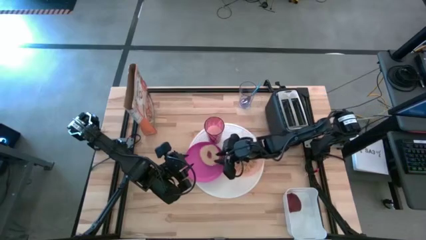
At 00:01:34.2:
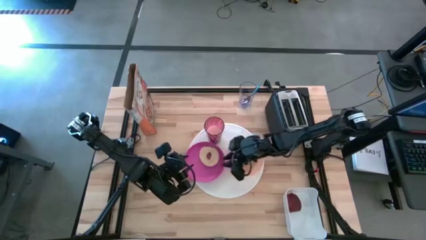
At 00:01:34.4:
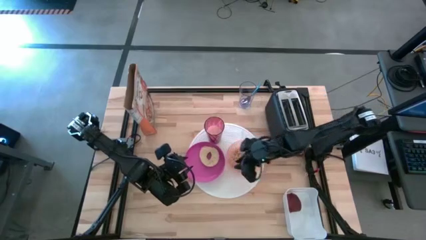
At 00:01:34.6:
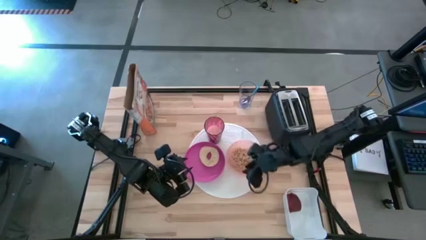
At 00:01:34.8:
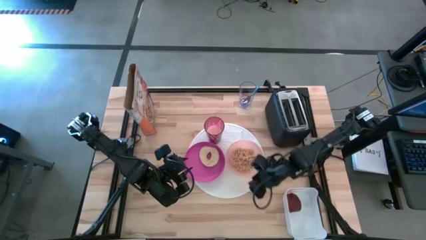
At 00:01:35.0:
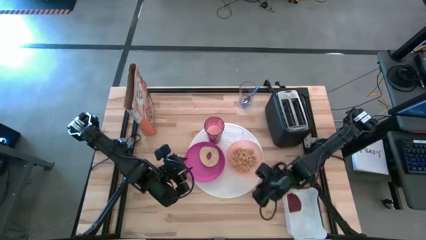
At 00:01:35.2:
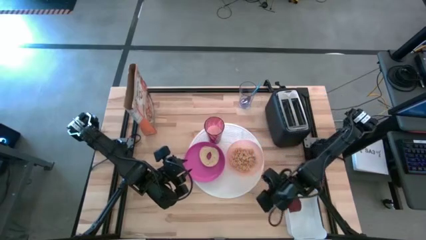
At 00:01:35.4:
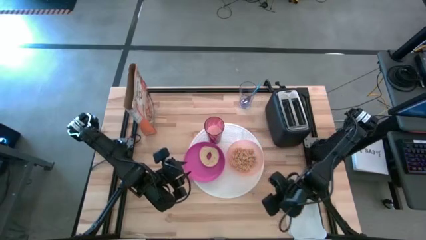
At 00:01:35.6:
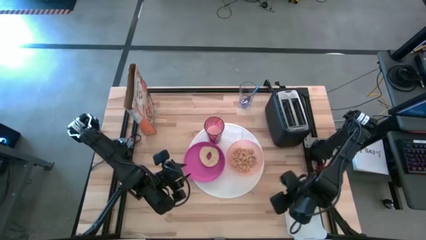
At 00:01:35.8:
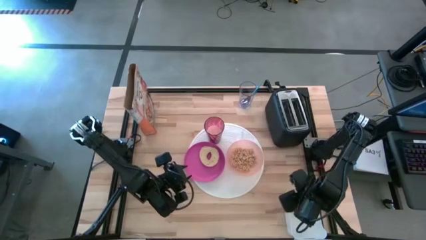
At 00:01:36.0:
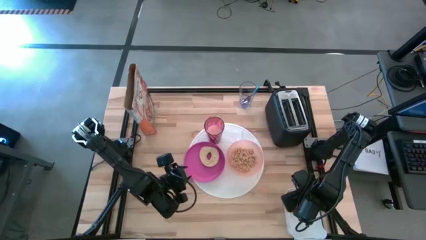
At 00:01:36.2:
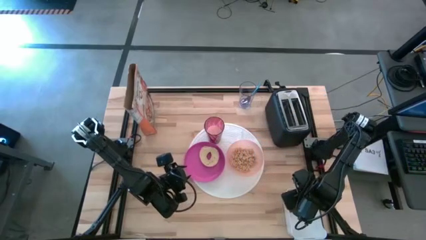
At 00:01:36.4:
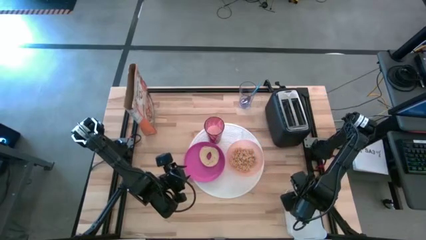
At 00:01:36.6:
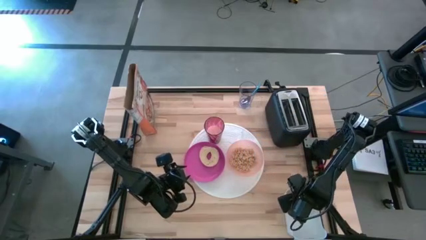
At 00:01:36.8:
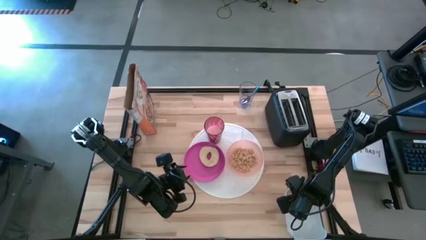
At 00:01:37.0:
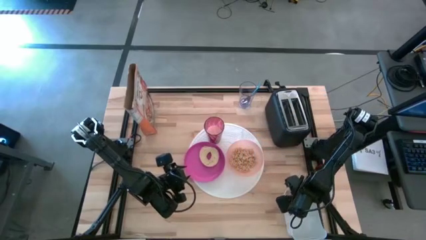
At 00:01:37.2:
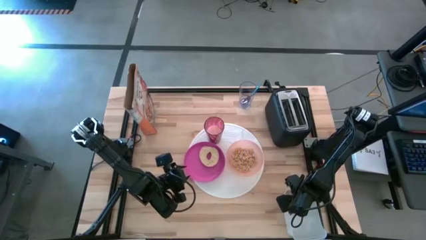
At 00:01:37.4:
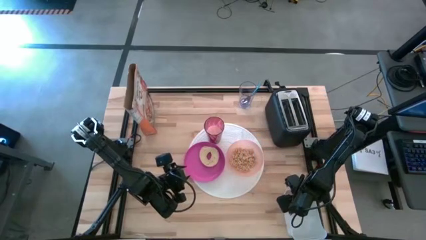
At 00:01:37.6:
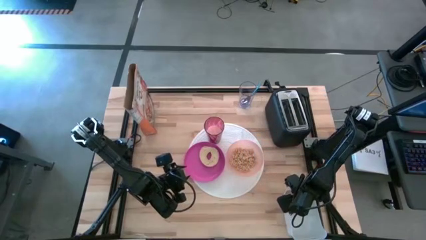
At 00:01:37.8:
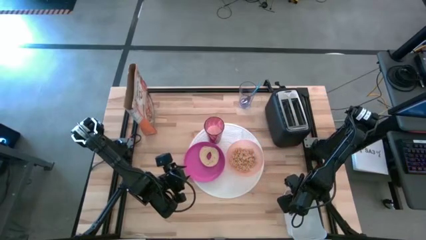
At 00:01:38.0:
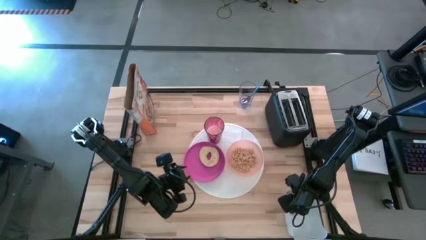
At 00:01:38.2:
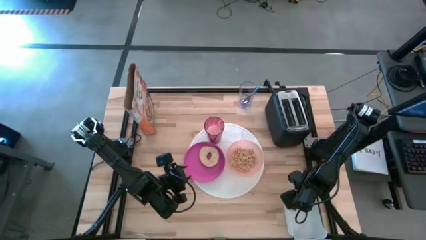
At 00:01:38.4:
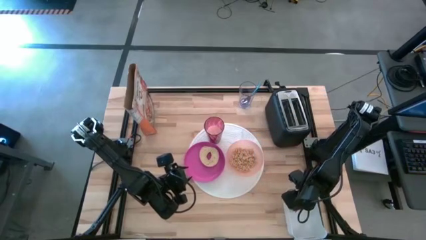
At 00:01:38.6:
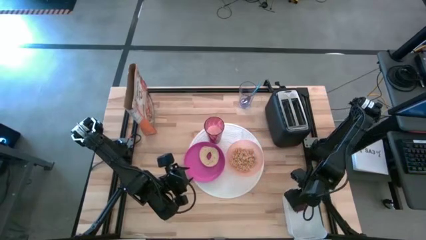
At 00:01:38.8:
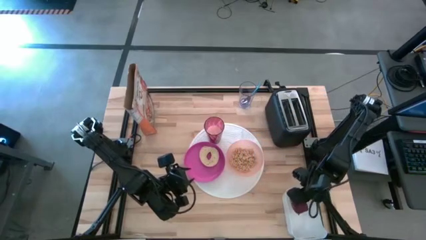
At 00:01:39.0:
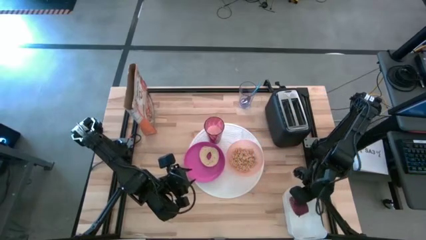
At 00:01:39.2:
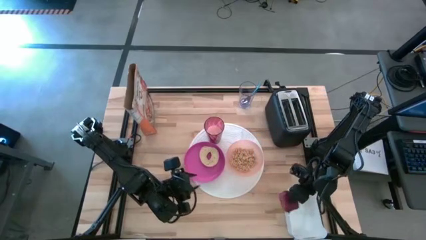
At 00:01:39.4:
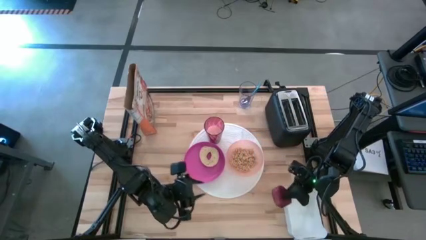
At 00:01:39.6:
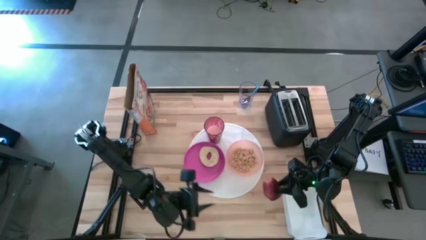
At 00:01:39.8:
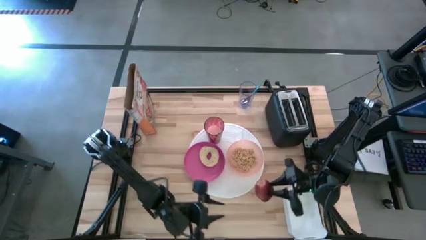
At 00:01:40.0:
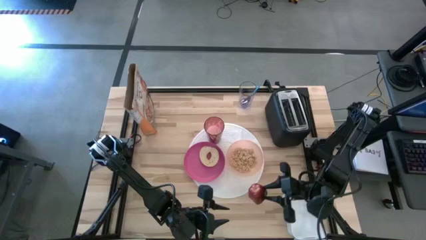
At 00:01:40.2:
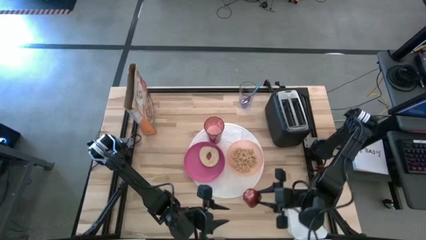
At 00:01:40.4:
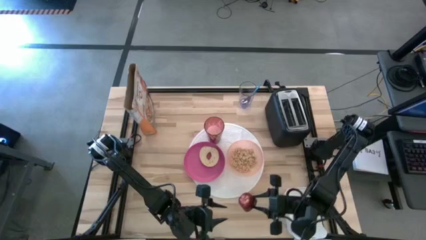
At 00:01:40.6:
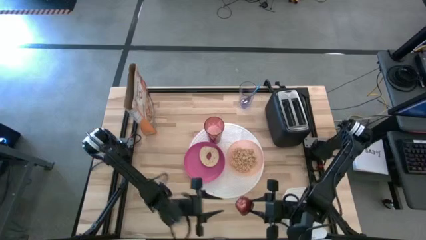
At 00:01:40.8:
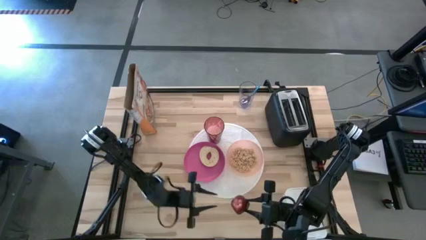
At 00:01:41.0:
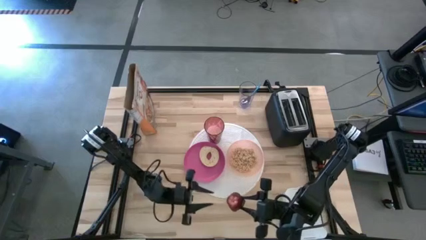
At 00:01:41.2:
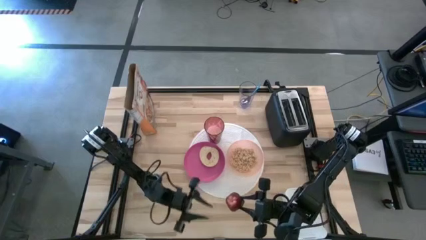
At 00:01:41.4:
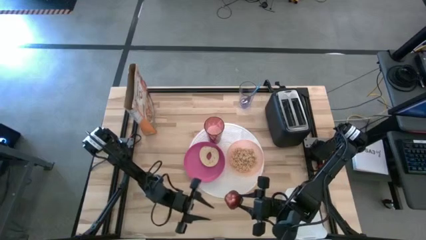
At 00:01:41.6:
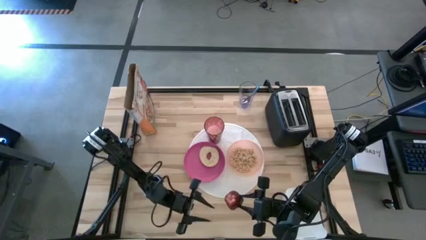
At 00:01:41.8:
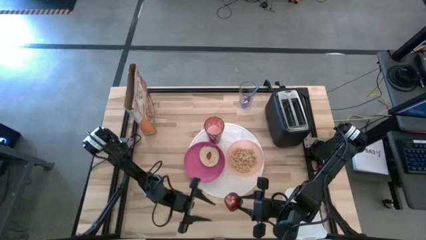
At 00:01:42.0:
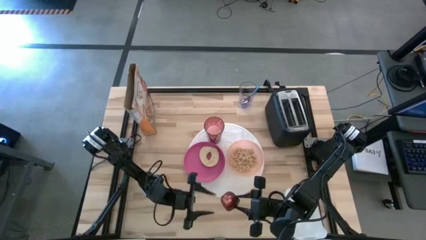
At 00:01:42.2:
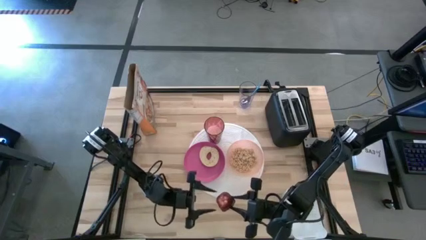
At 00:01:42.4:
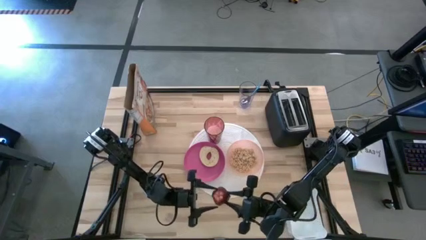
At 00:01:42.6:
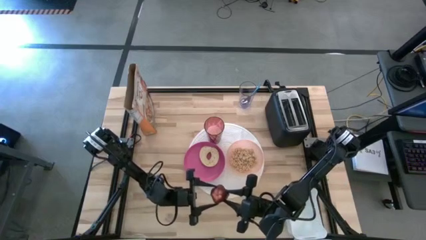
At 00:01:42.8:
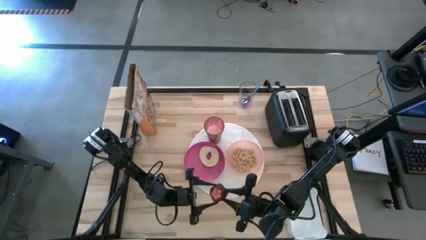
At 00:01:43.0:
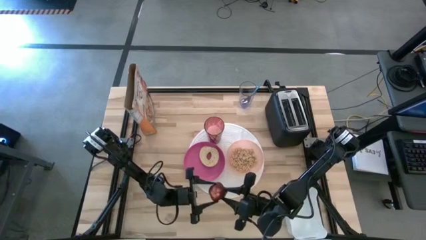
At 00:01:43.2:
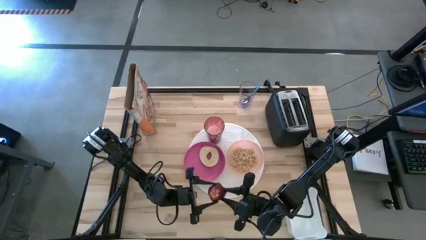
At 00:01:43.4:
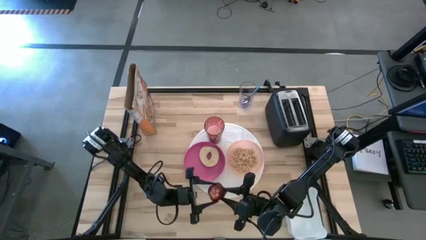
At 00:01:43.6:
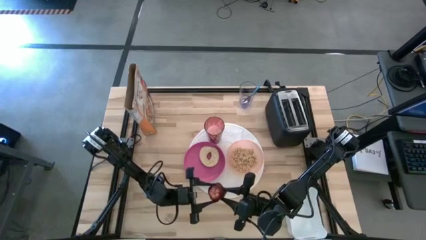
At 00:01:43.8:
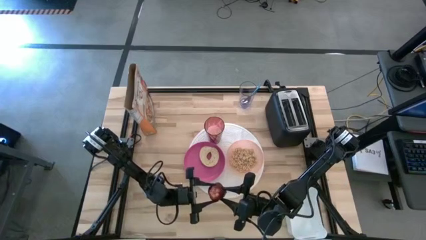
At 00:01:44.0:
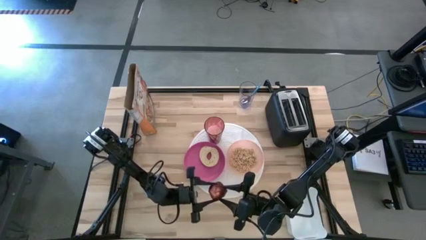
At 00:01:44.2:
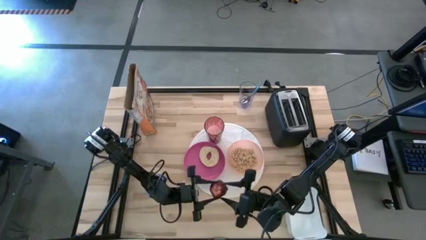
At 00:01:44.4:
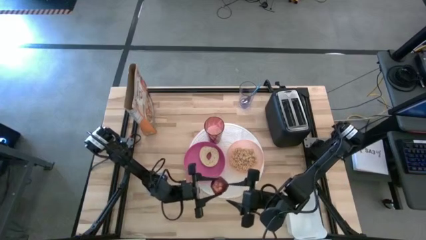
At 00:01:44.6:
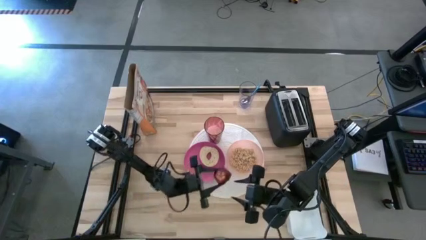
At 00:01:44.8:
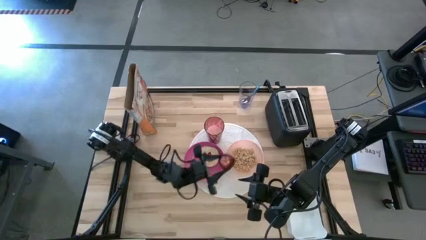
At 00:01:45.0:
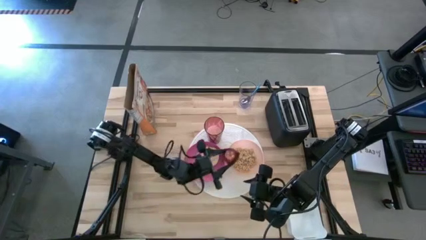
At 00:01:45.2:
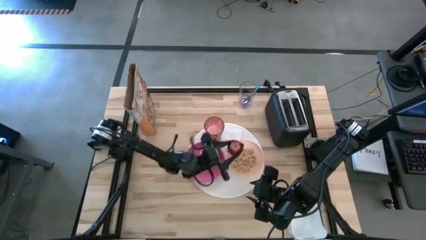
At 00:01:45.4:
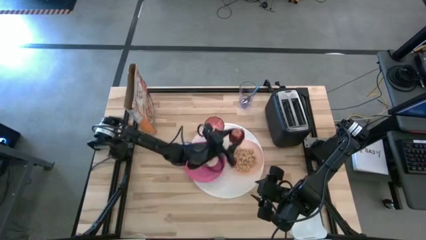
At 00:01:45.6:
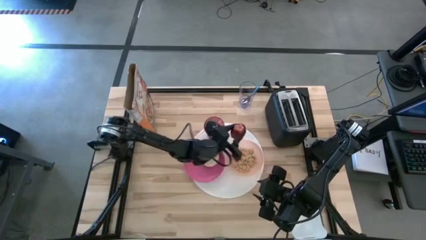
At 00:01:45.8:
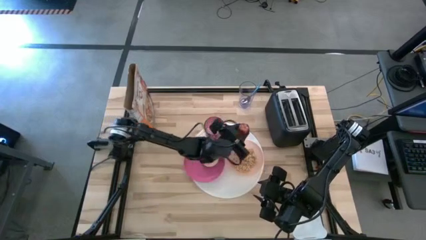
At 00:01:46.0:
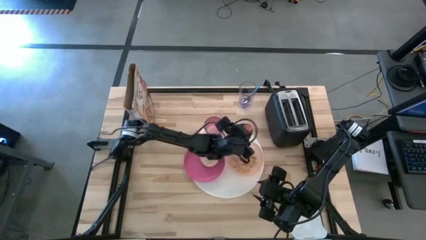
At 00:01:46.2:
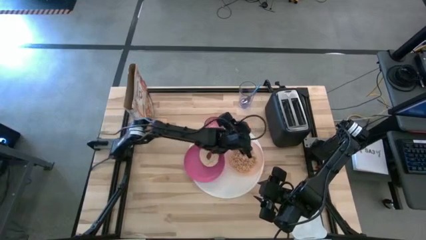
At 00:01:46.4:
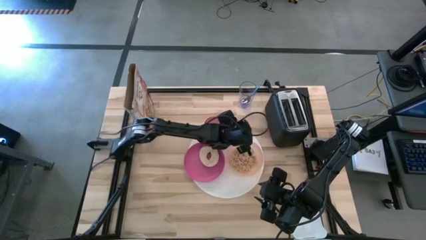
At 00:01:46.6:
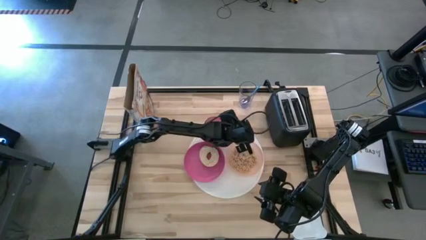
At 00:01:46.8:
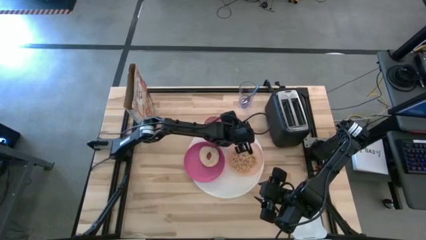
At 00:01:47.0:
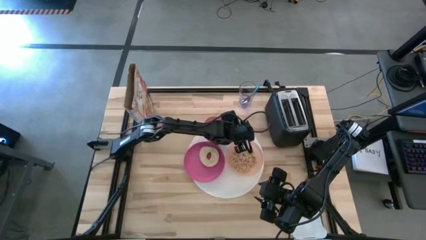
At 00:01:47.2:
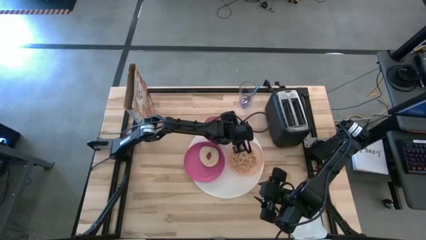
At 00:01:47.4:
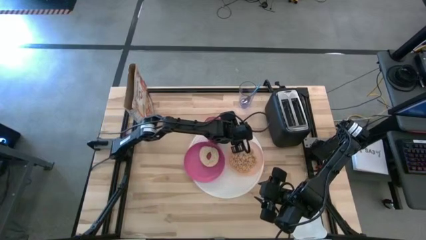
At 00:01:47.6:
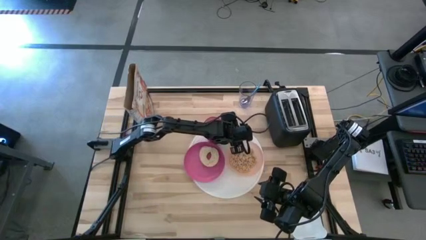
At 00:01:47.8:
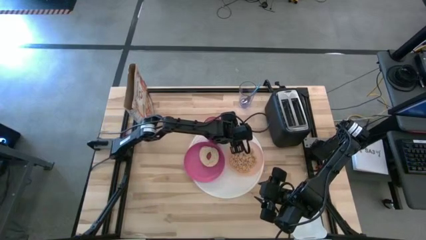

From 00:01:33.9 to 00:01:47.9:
Task: Arrange a breakfast setting
Put the red apple on the white table mat right beside to the red glass of milk
